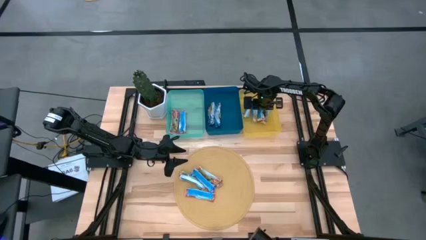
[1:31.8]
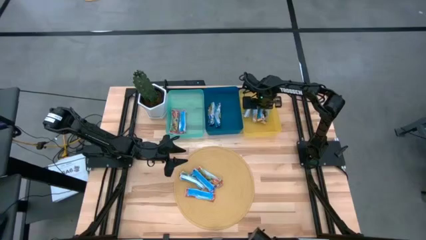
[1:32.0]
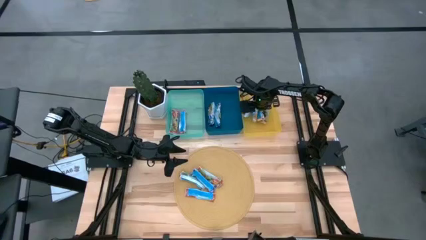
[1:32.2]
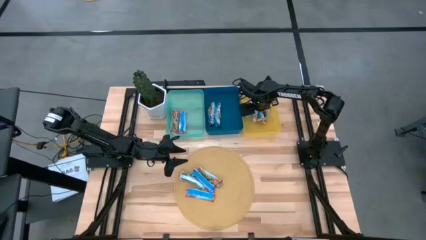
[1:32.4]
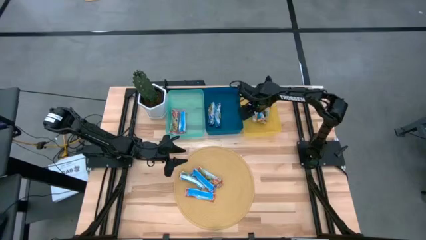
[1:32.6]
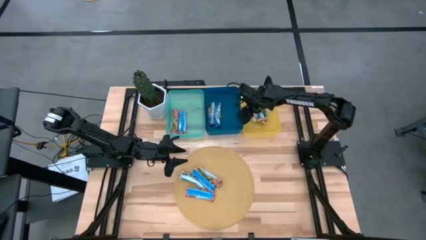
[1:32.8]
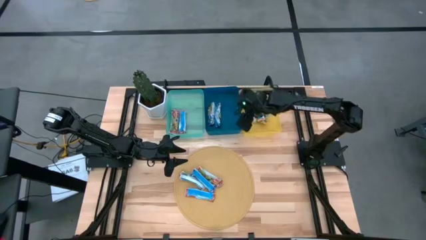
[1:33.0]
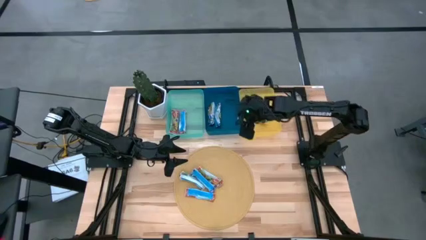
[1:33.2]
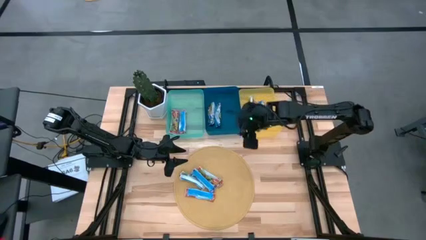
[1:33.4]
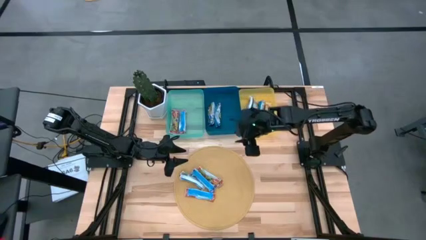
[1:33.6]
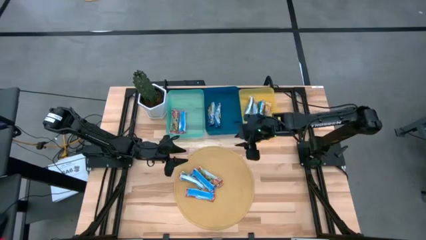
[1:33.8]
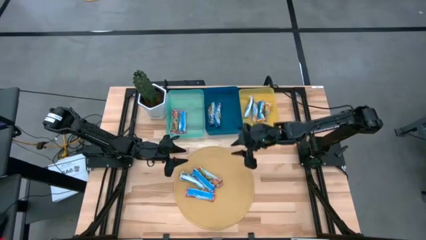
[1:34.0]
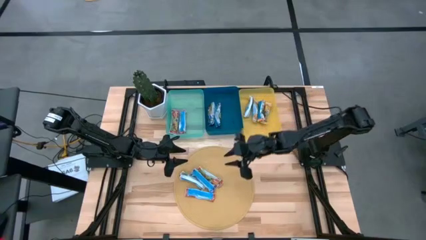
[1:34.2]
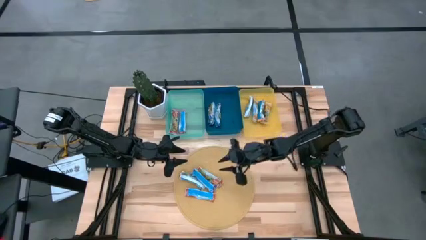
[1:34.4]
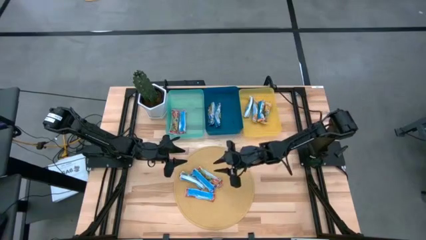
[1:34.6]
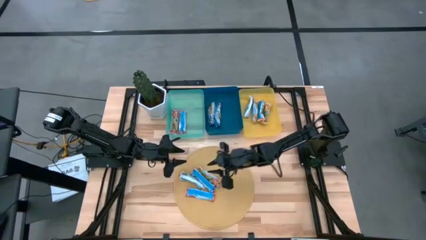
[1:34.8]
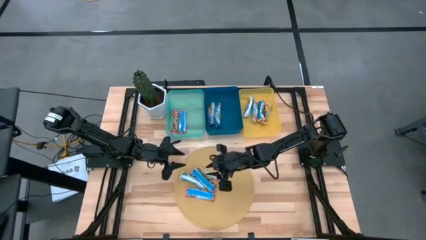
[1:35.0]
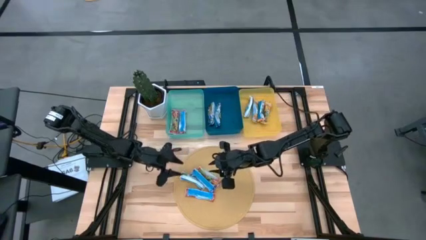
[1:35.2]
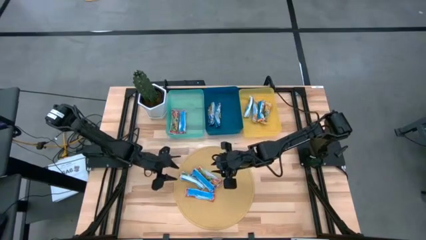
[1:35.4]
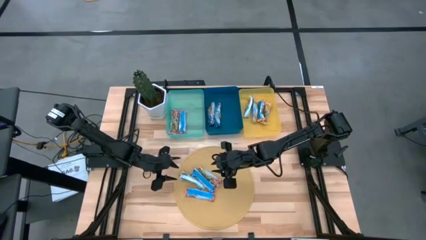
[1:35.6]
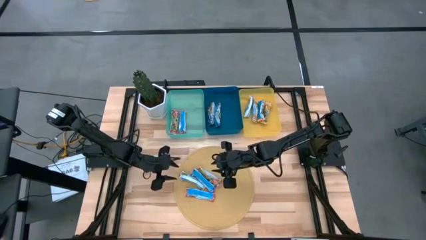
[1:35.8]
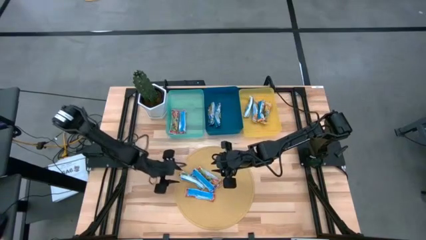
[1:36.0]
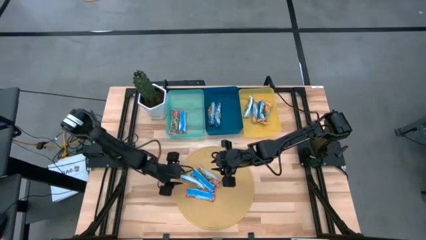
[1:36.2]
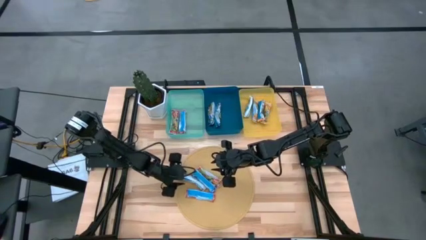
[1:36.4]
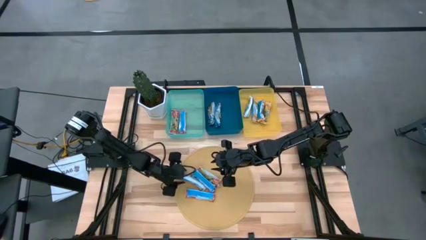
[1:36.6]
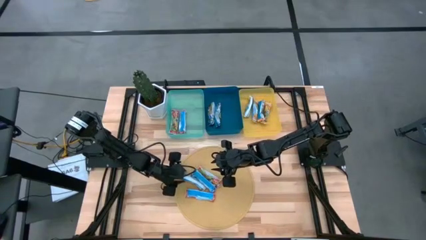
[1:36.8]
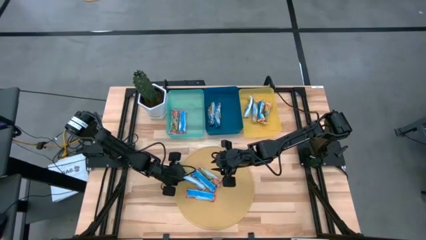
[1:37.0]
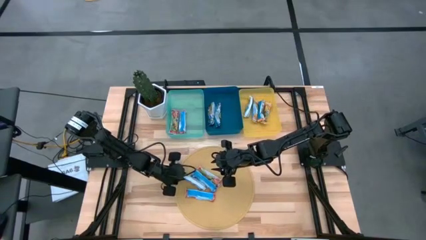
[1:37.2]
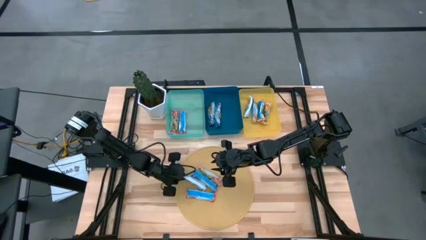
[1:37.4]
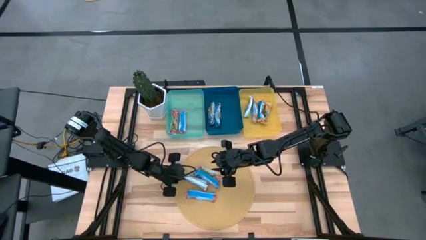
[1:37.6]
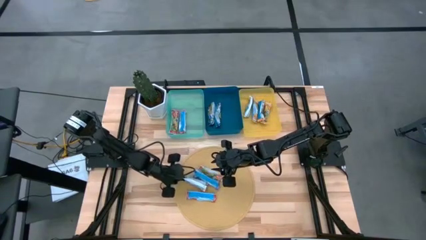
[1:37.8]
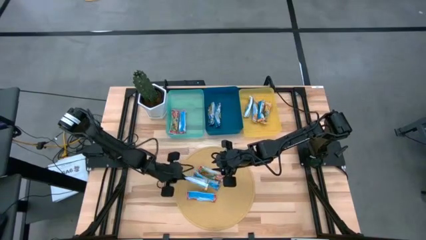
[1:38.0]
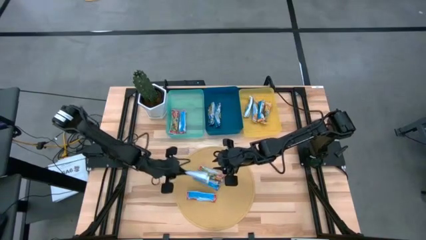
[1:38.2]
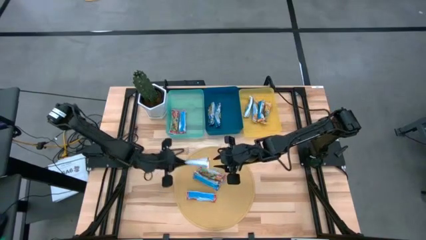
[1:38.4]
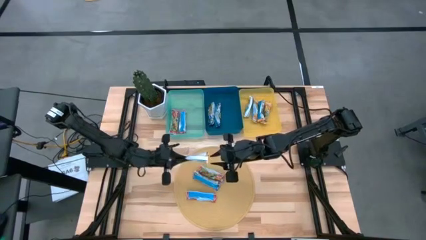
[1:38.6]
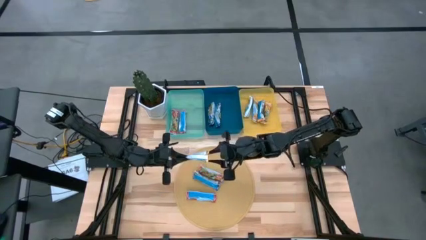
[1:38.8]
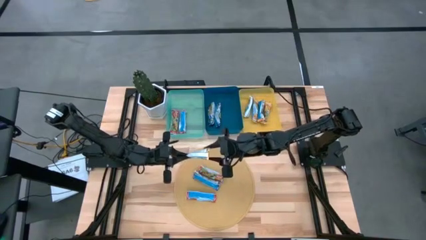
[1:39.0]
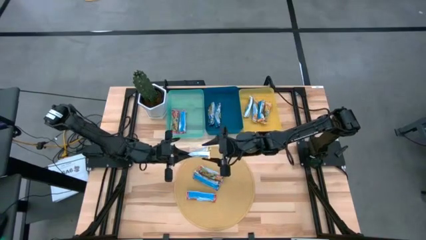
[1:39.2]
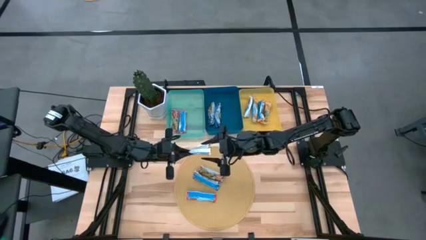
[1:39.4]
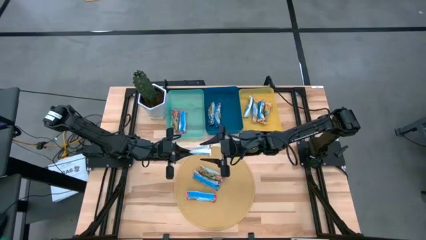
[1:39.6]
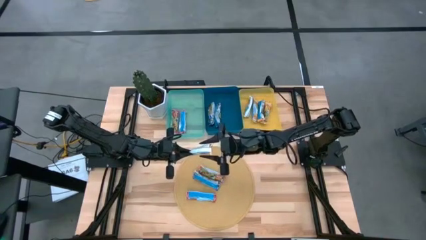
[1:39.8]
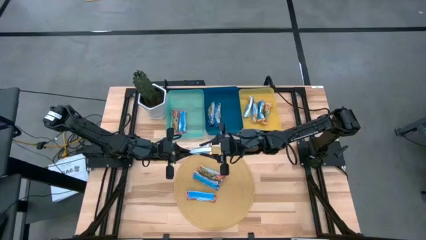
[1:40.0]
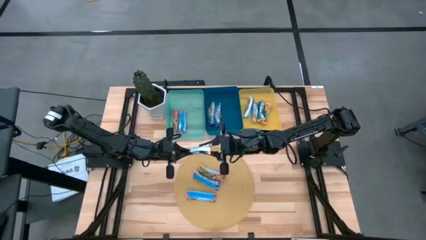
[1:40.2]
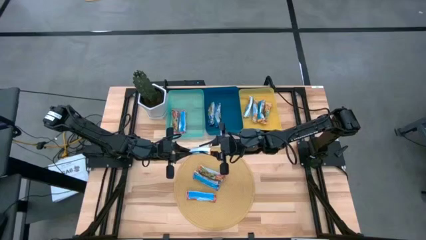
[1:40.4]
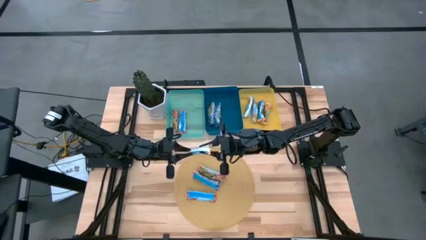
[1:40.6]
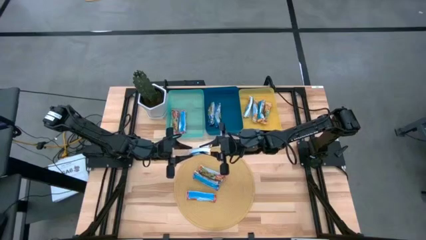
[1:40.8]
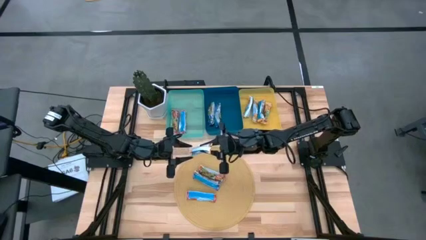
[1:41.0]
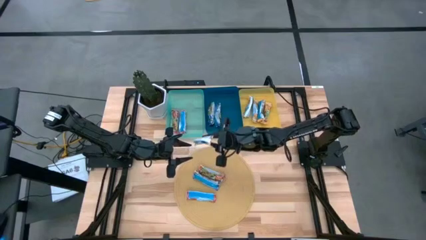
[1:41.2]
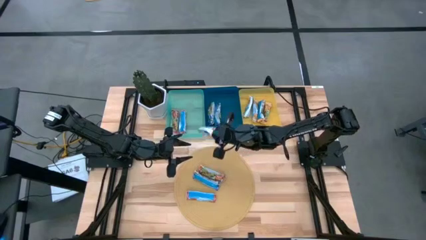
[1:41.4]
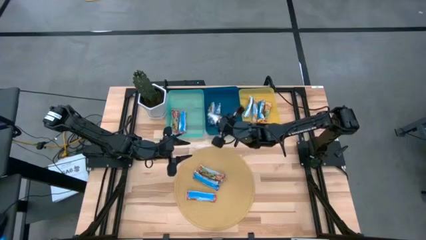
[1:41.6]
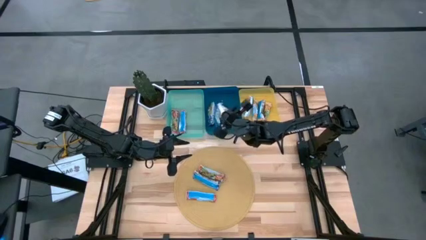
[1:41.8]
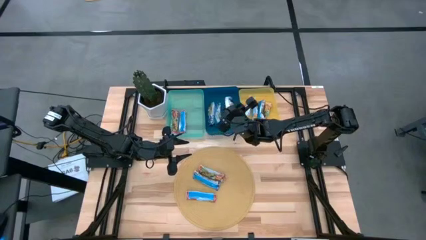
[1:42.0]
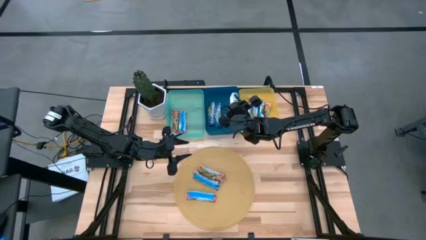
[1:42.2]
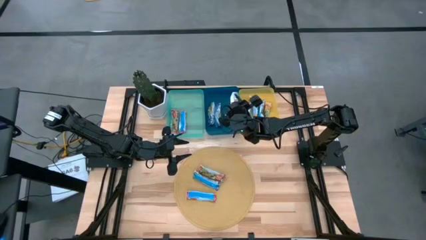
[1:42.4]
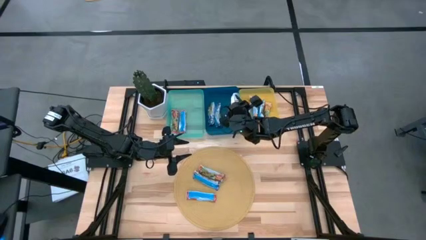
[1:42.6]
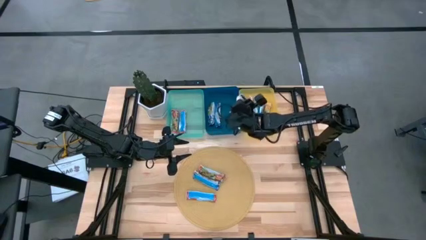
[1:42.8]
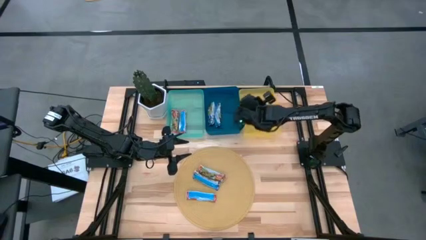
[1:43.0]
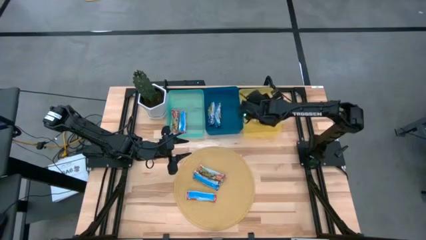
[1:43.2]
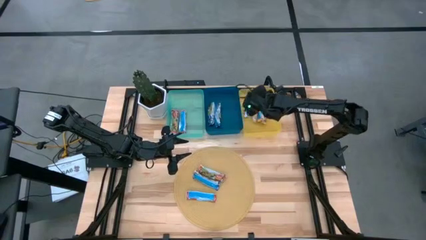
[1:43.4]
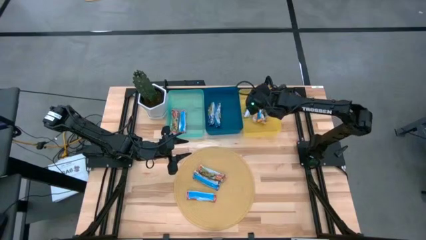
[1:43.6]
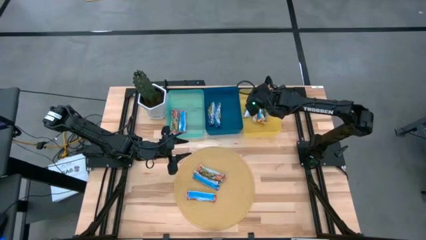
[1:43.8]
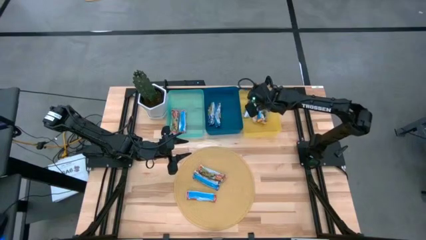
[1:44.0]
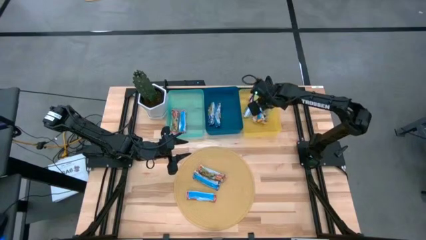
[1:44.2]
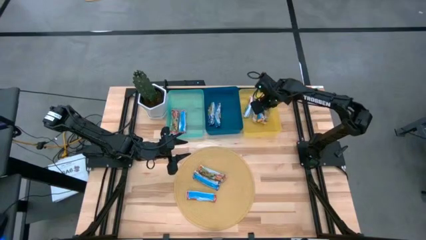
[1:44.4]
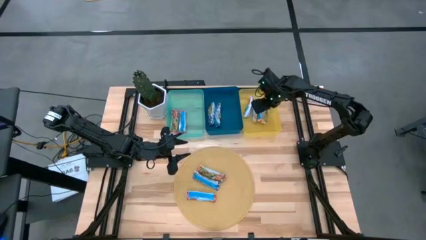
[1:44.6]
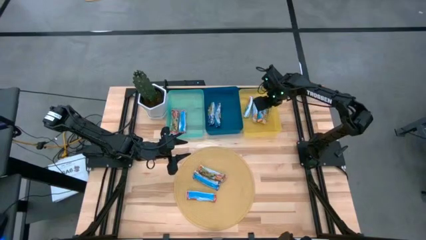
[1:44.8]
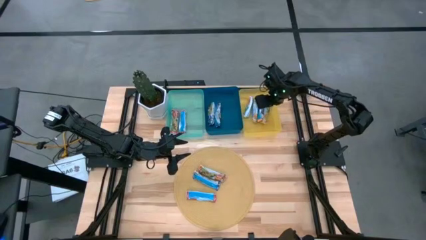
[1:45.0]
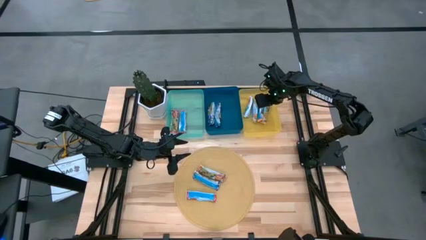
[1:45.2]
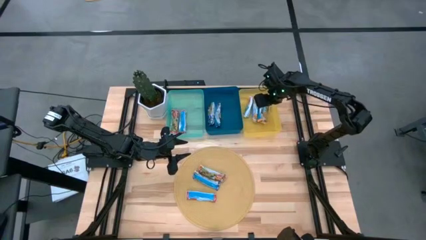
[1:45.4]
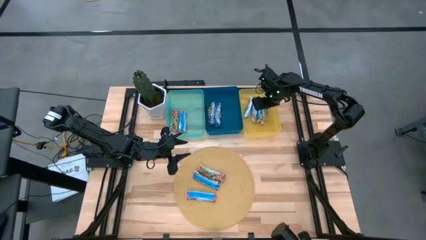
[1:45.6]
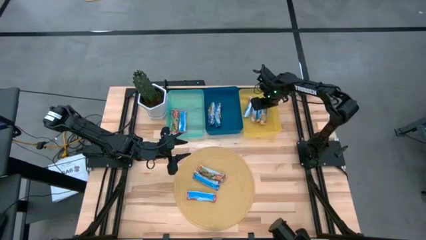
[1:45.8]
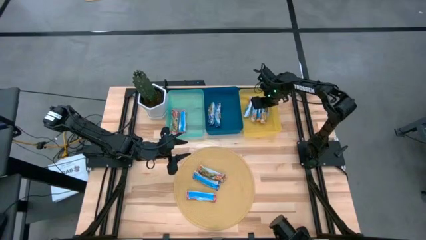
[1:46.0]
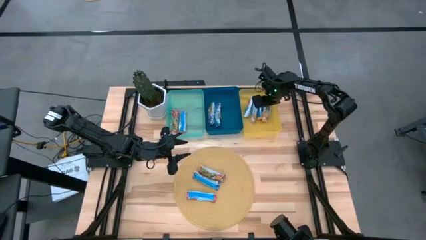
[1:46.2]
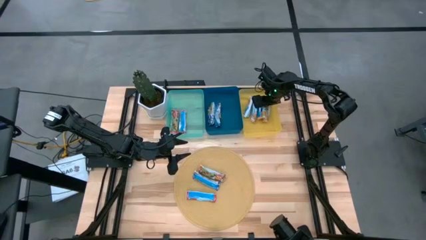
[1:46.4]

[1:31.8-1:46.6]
Task: Pick and place Granola Bars by type
Put the yellow granola bar into the yellow bin

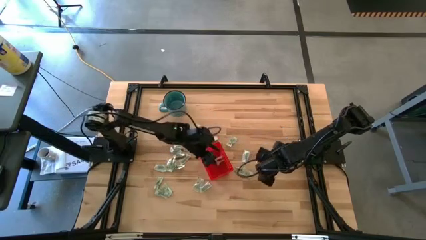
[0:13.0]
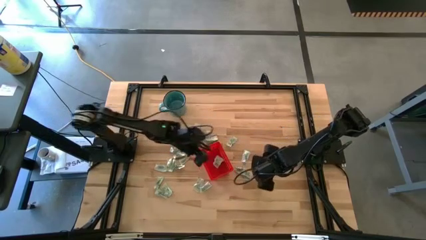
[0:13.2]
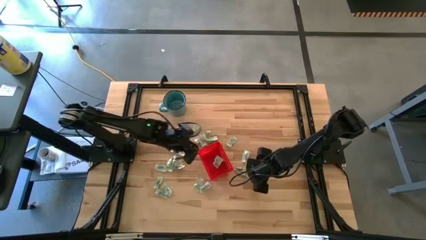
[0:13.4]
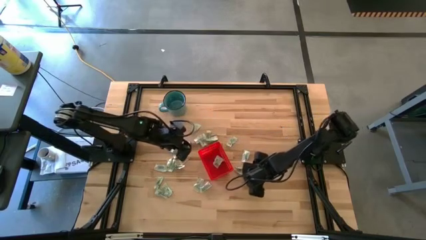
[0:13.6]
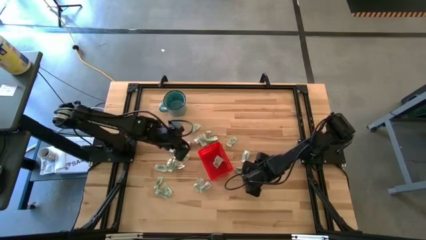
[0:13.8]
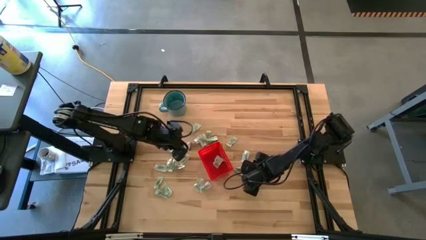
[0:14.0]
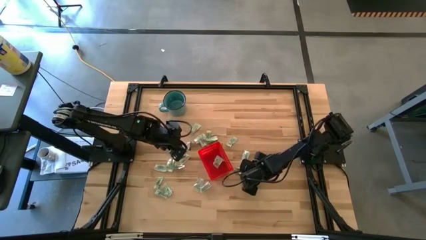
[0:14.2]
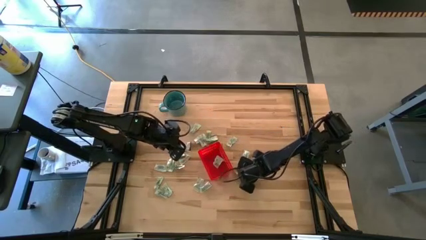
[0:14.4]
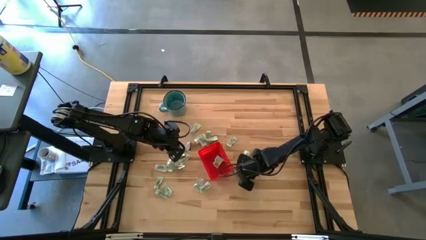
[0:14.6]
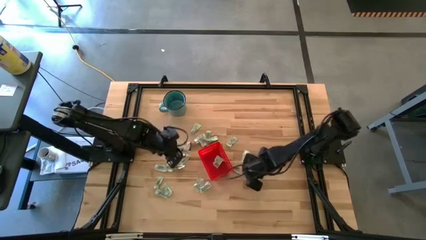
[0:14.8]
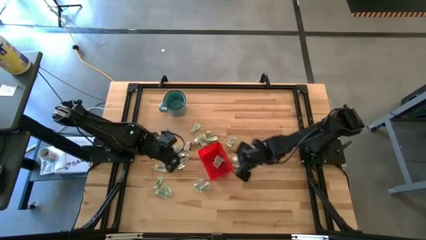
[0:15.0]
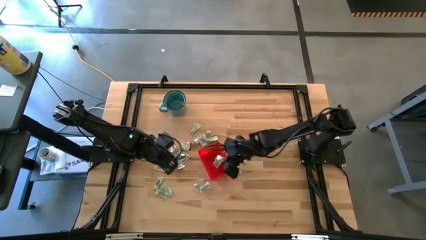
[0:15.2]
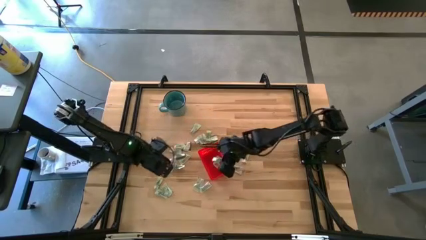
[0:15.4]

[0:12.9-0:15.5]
Task: Pick and place Stevia / Truvia into bins
Put the white stevia packet into the basket

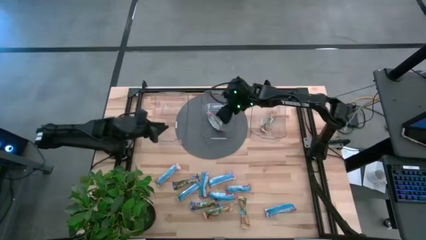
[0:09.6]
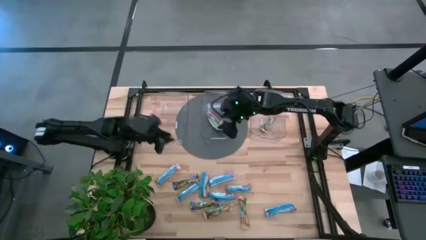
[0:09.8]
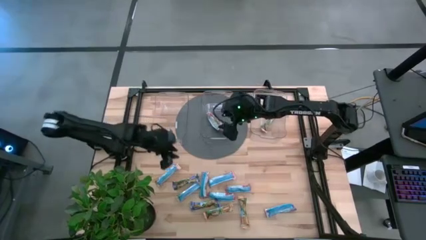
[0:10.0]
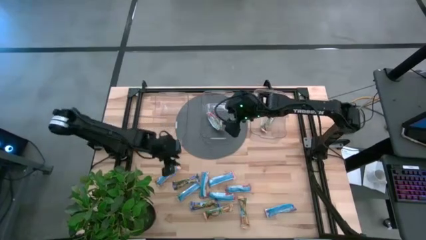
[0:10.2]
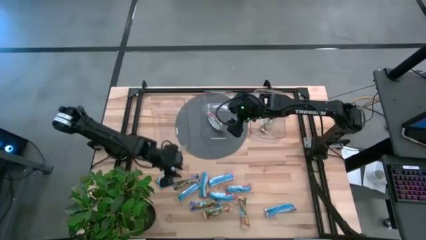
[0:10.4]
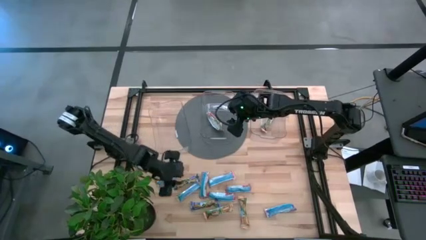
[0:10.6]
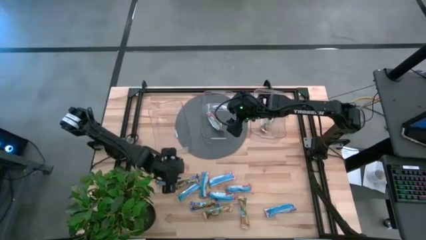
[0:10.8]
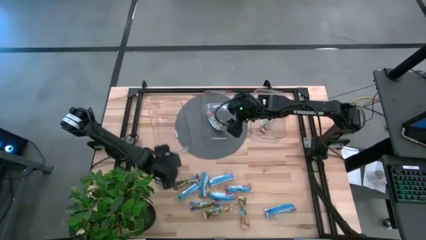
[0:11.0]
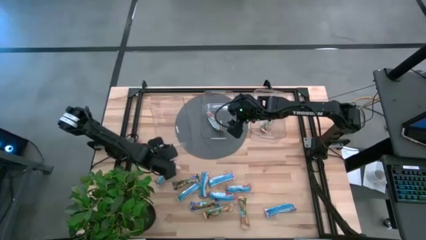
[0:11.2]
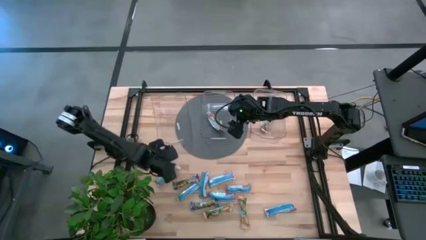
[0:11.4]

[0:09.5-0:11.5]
Task: Pick and place Granola Bars by type
Adjust the left transparent bin
